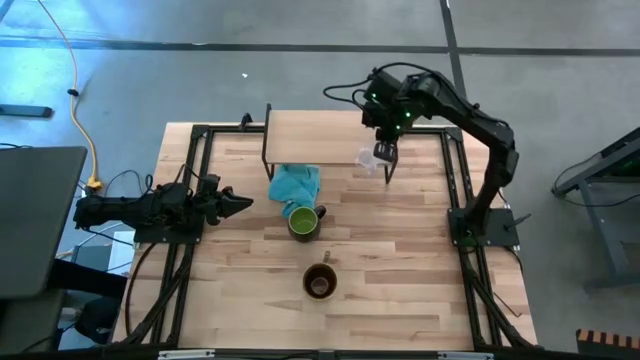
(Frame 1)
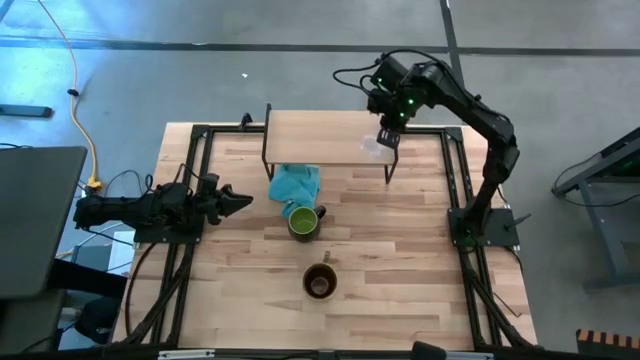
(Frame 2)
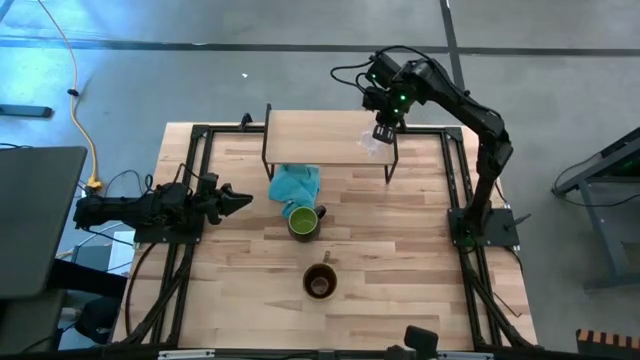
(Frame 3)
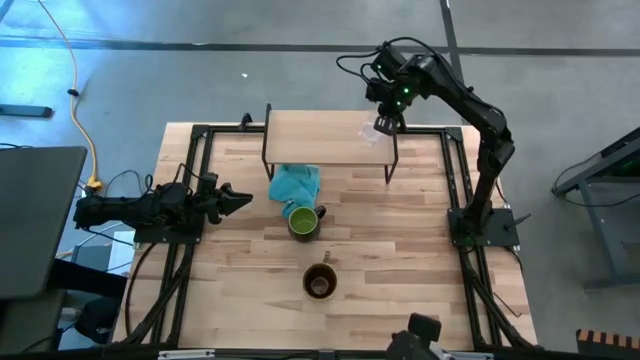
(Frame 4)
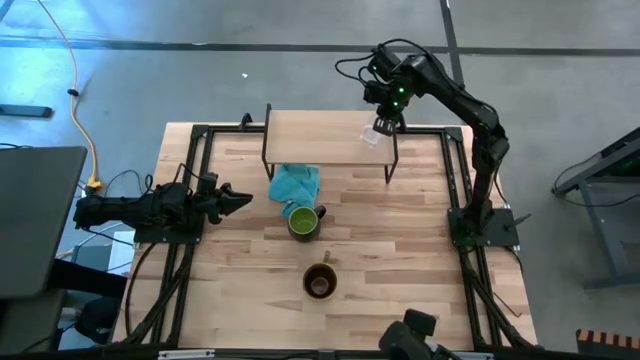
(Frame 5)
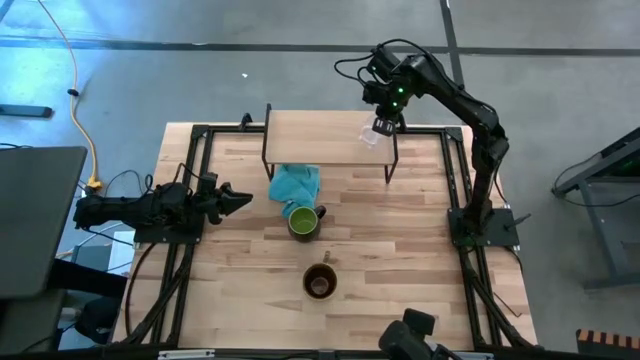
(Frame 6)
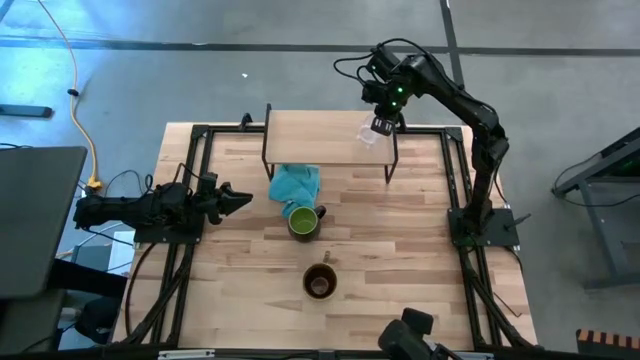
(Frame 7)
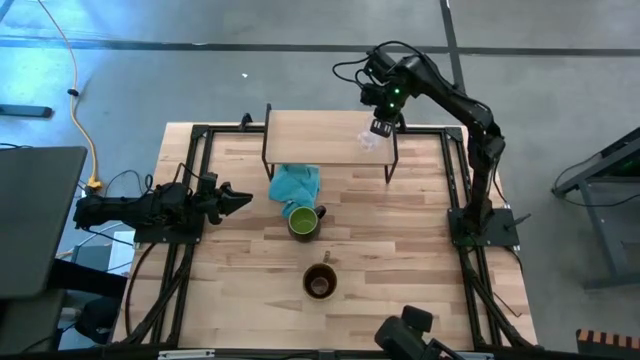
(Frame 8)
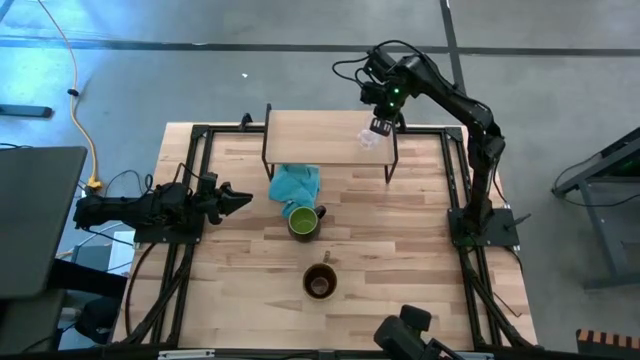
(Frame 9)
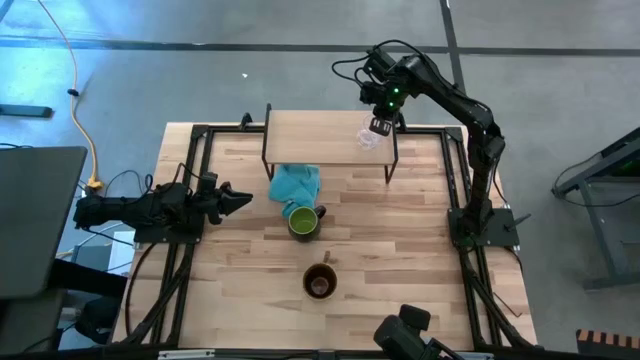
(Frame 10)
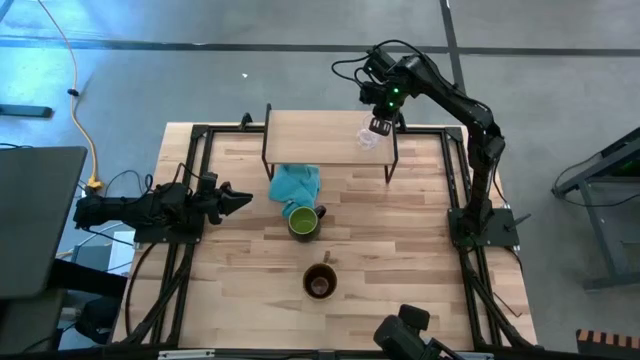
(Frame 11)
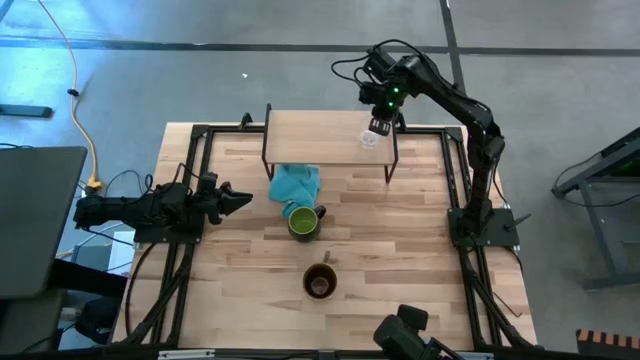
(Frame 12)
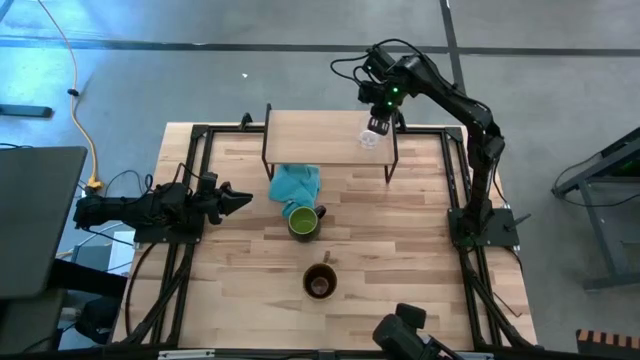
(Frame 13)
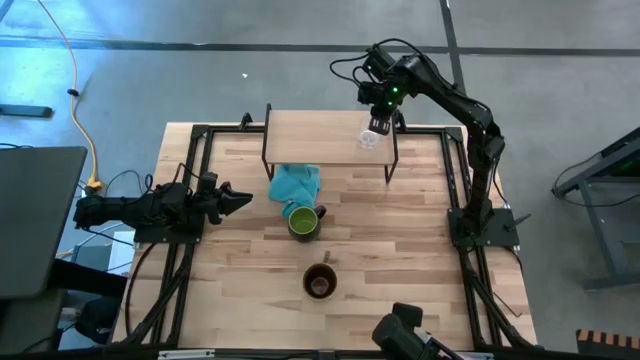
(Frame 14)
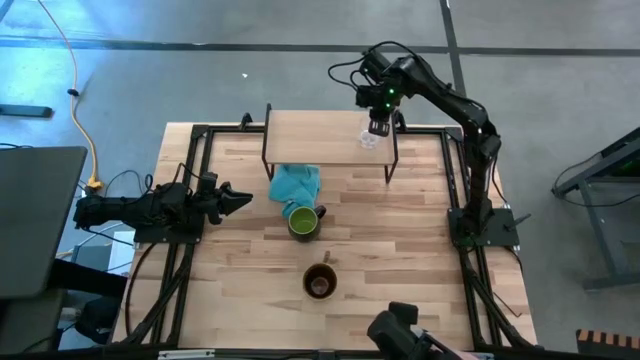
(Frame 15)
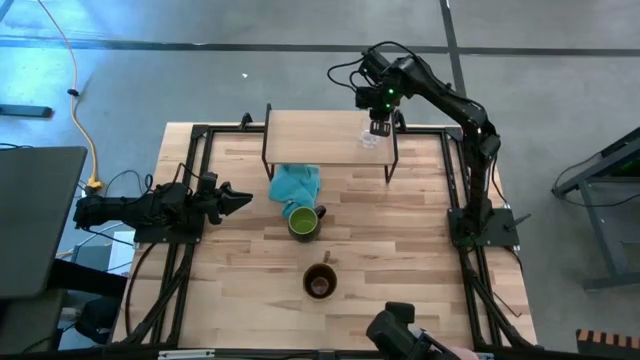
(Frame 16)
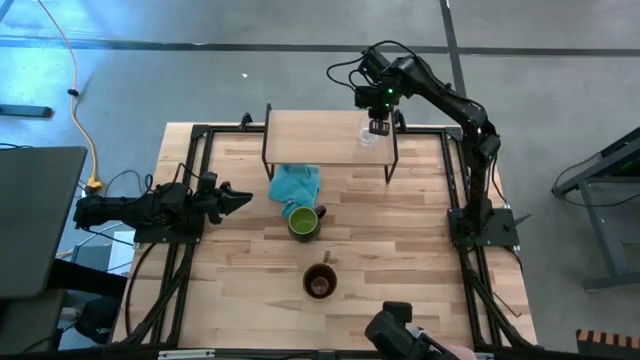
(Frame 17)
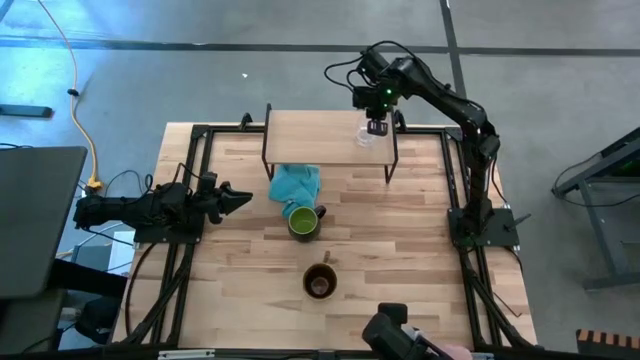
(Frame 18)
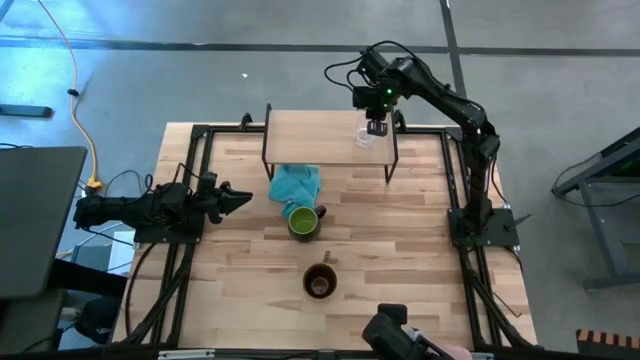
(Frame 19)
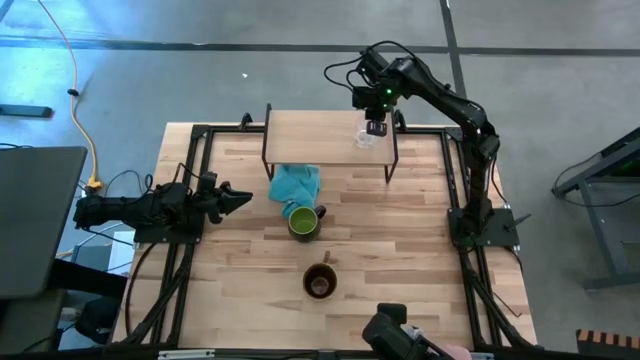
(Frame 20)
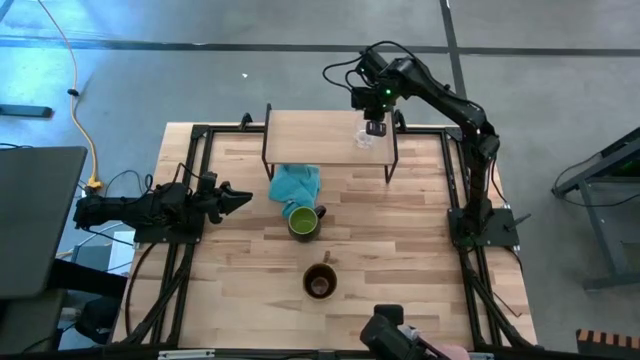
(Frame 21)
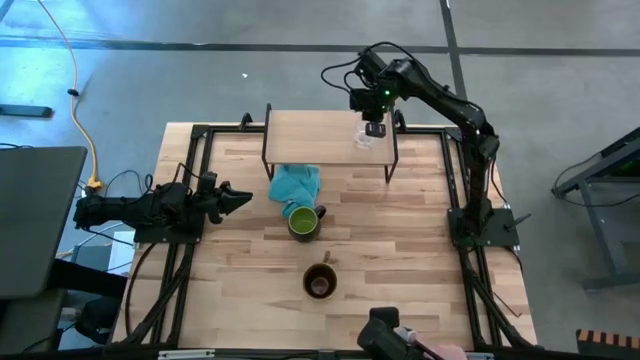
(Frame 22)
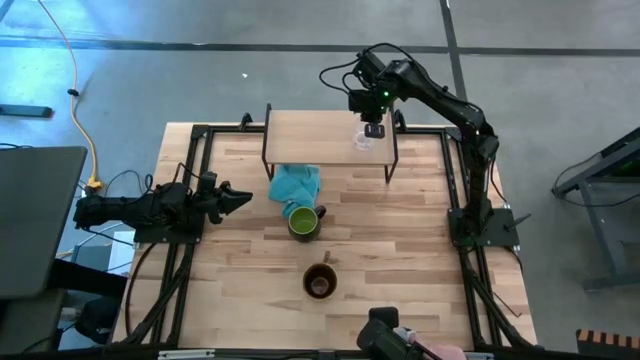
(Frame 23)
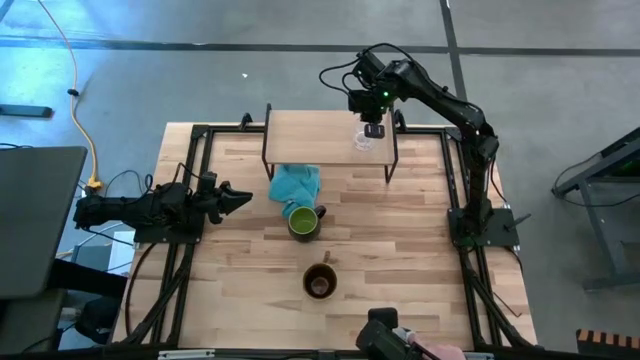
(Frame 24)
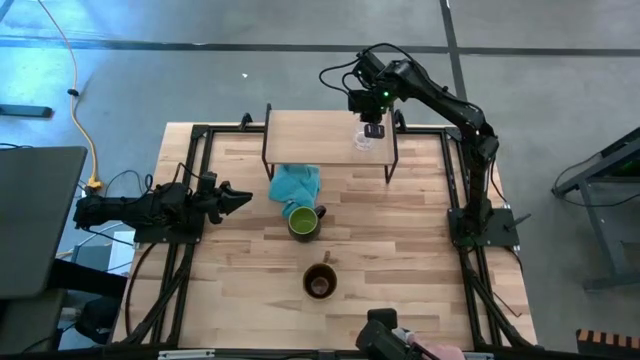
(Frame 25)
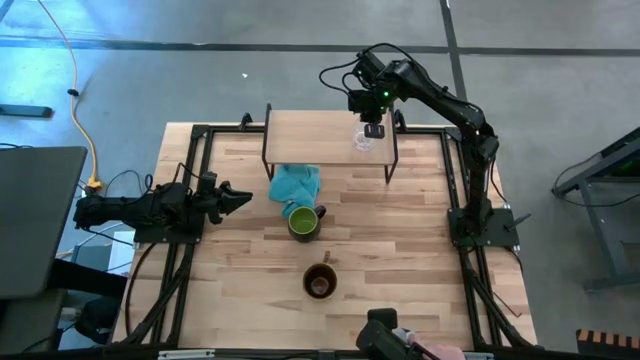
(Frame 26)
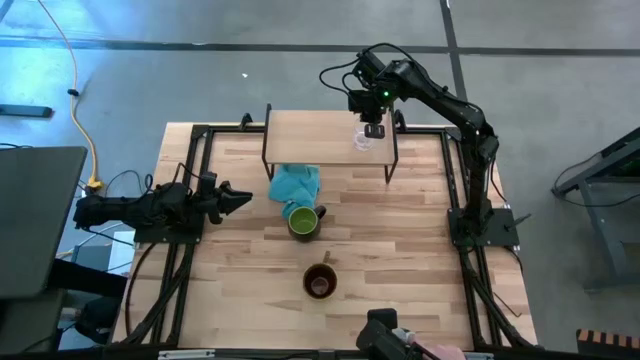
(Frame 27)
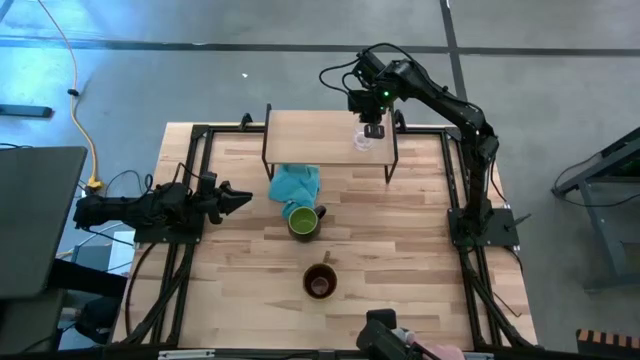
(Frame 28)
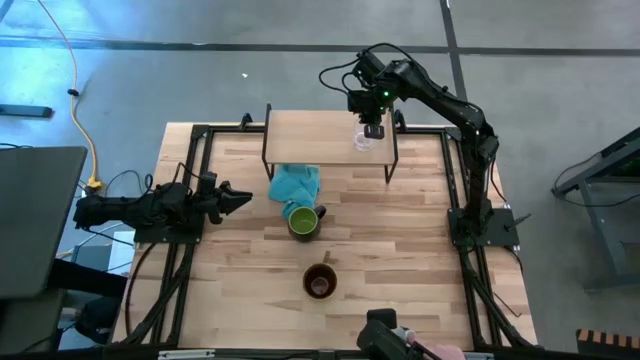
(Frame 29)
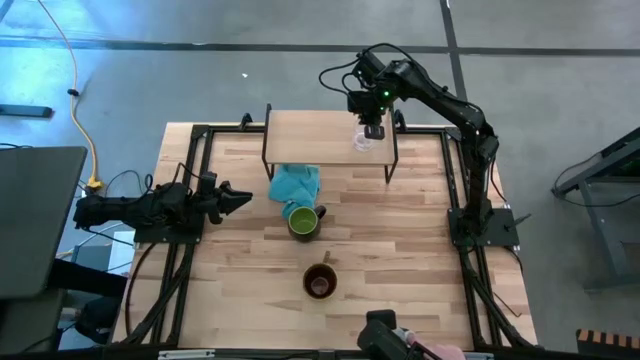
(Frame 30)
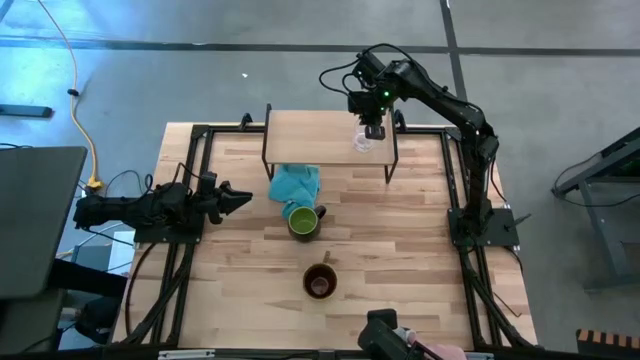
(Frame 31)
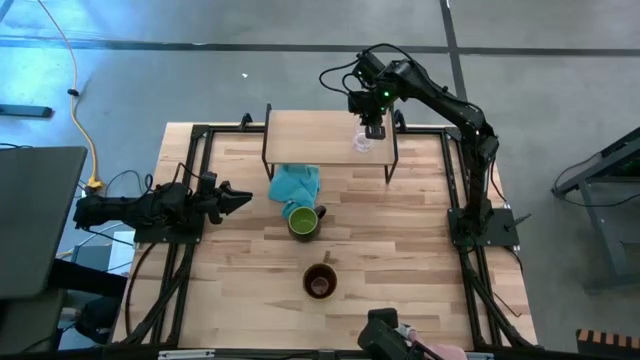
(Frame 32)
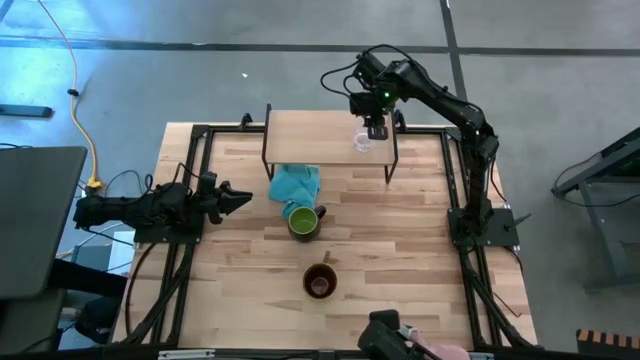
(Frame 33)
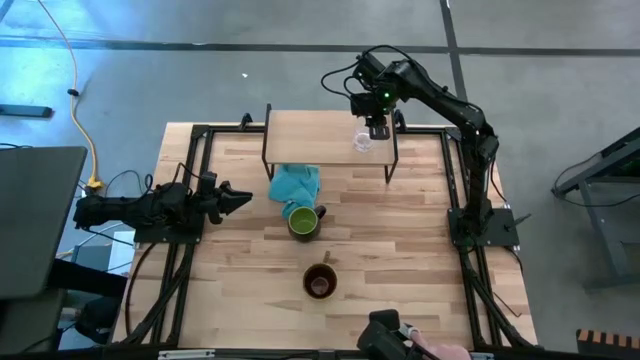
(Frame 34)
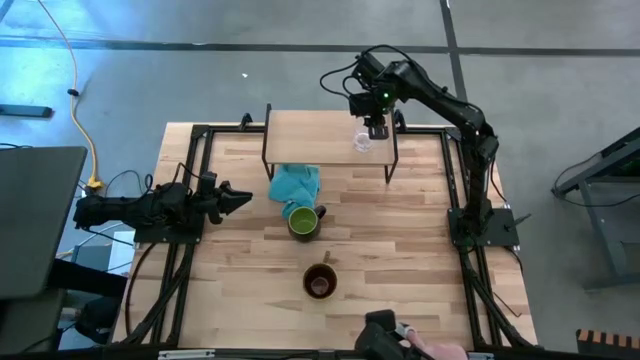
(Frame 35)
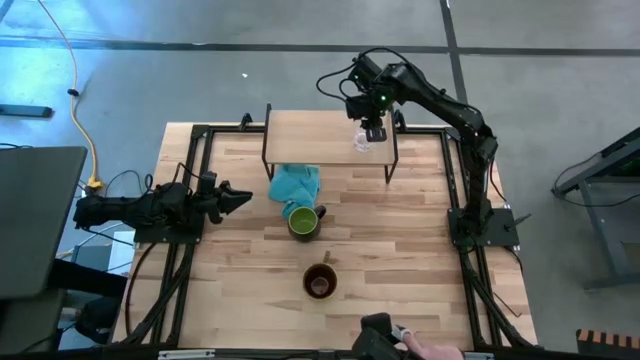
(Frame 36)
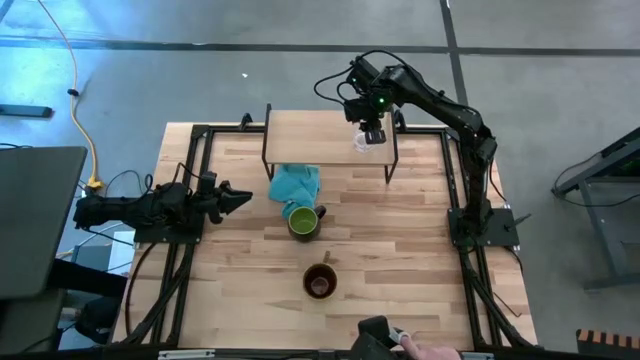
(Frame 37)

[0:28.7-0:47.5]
Task: Stack small to large cups/mugs on shelf
Put the transparent mug on the shelf

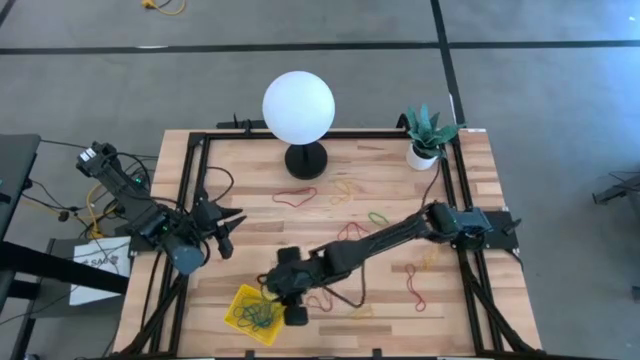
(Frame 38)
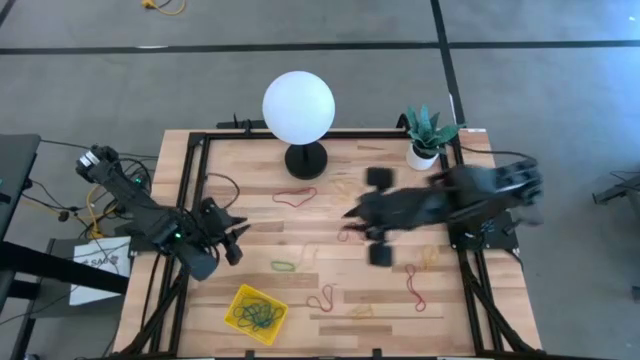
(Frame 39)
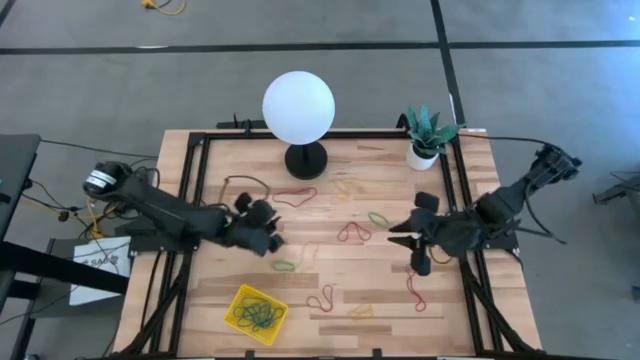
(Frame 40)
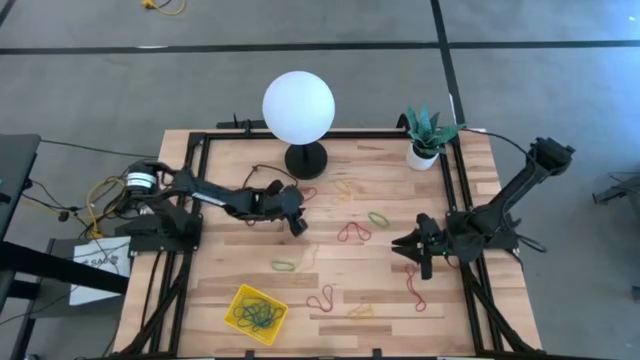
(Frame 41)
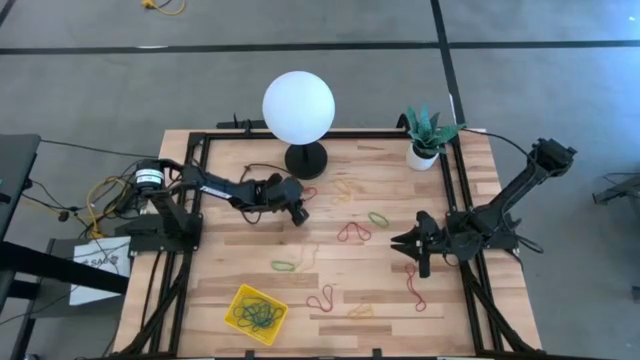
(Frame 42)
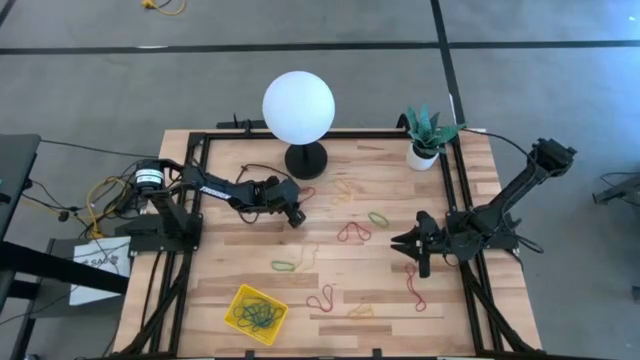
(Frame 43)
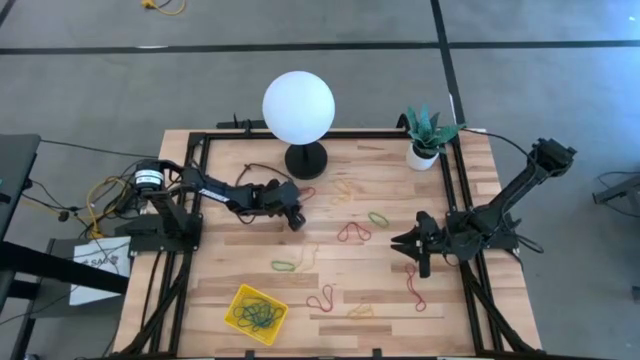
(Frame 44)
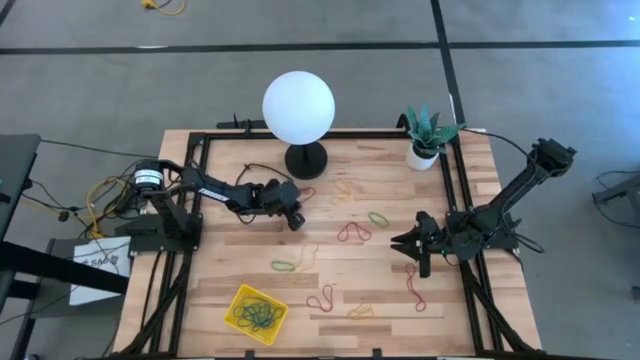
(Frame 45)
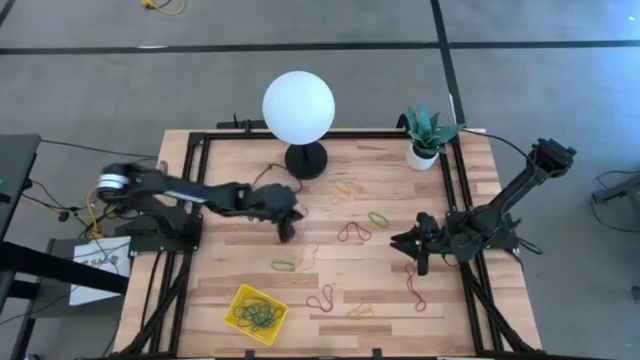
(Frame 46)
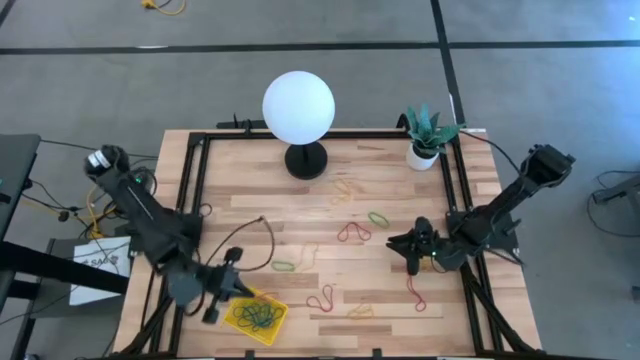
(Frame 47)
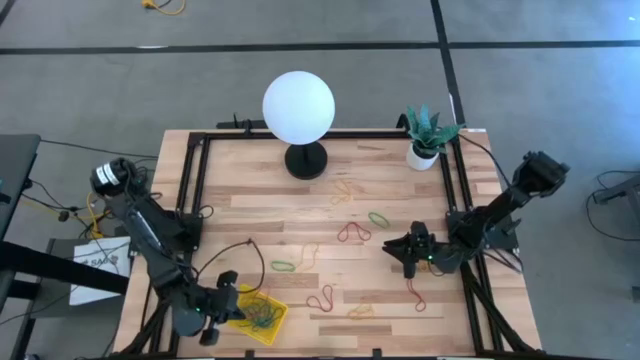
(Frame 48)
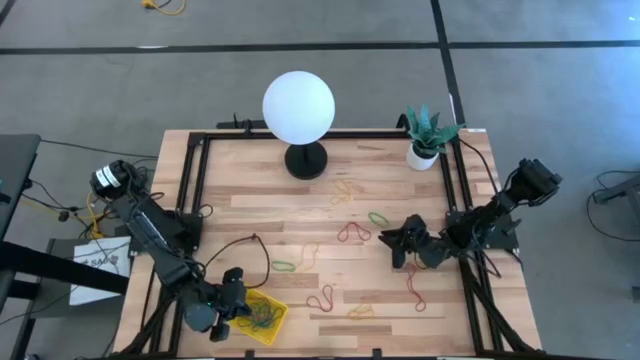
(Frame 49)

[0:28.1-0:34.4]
Task: Pick and place items into bin
Put the red rubber band into the yellow bin
